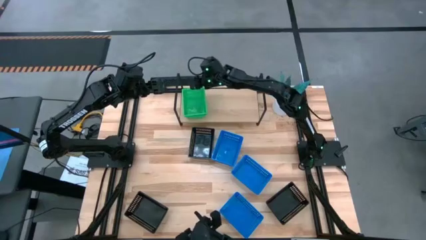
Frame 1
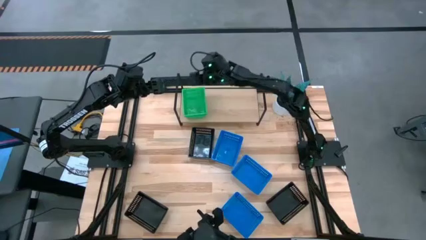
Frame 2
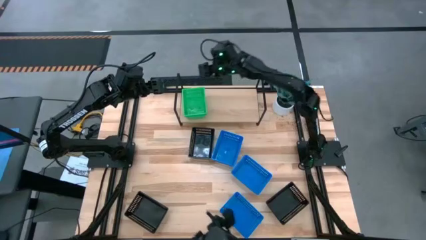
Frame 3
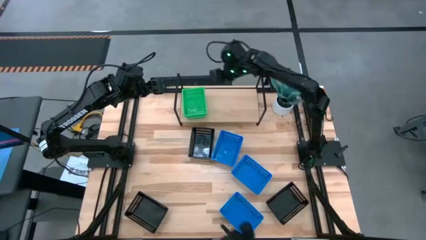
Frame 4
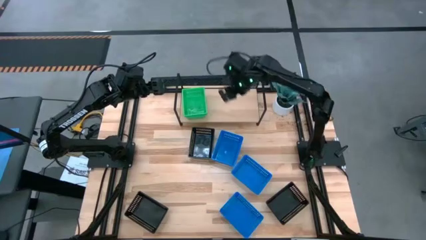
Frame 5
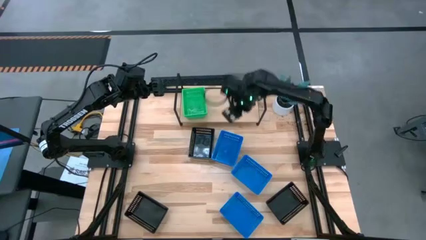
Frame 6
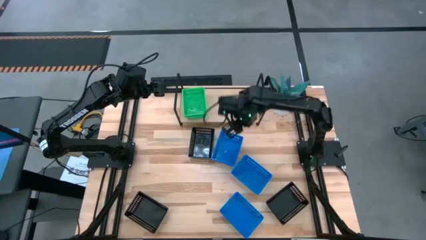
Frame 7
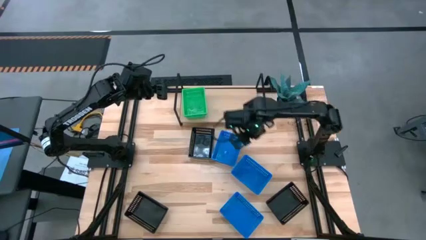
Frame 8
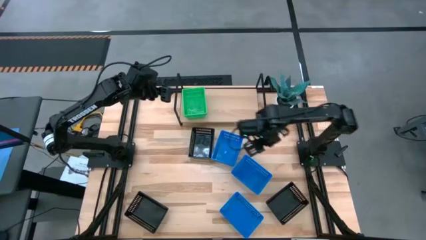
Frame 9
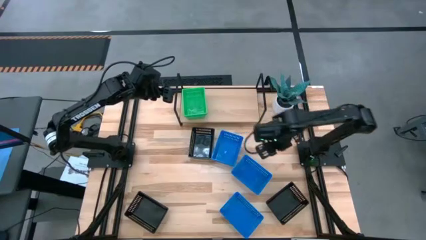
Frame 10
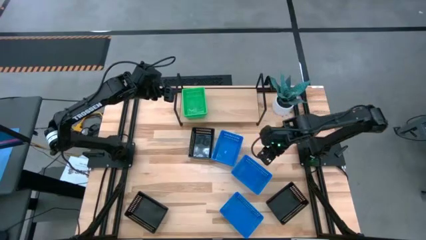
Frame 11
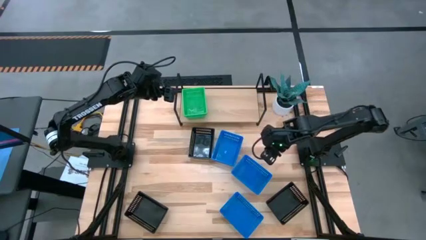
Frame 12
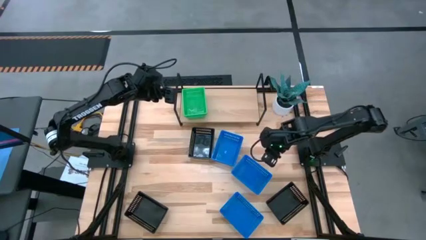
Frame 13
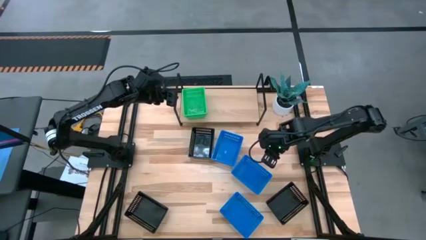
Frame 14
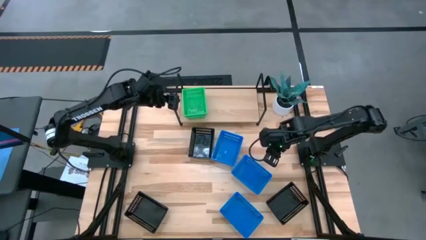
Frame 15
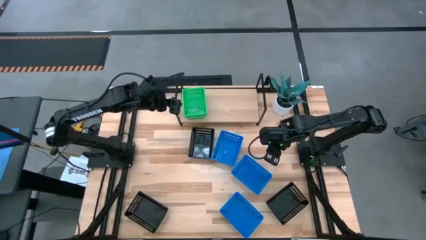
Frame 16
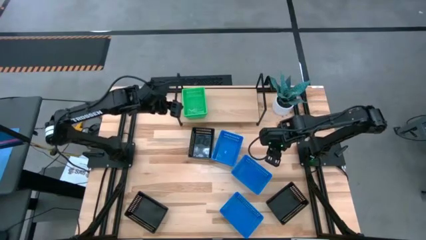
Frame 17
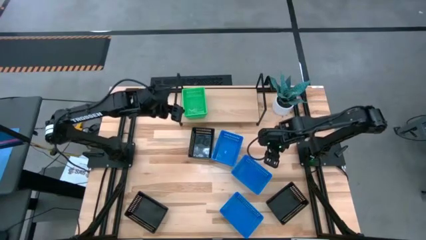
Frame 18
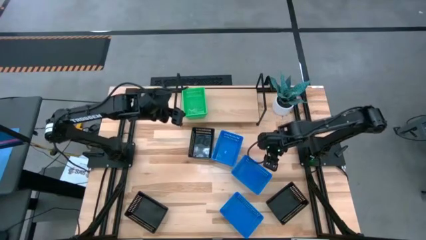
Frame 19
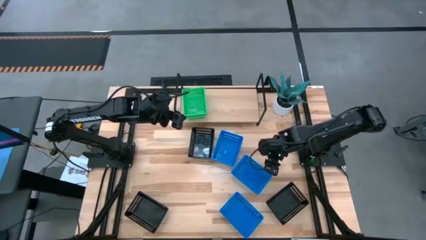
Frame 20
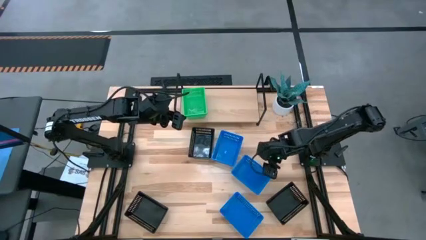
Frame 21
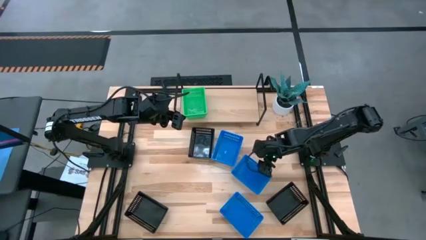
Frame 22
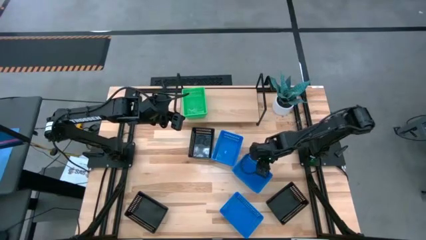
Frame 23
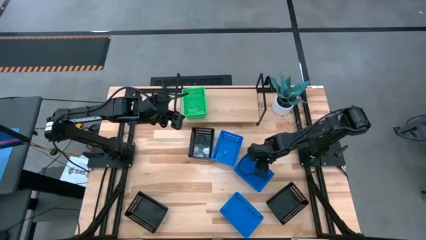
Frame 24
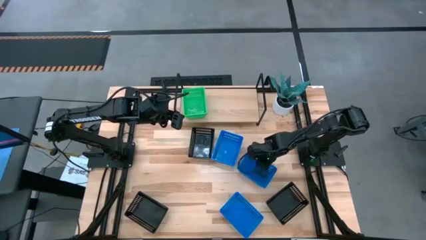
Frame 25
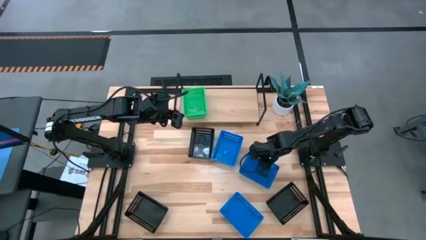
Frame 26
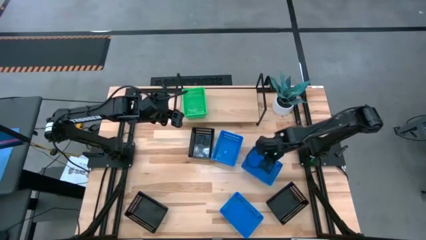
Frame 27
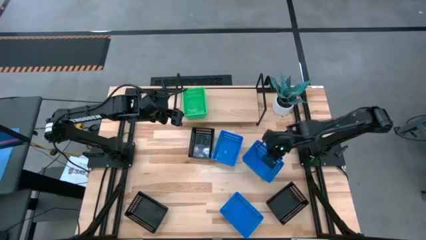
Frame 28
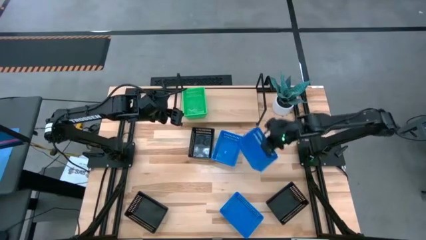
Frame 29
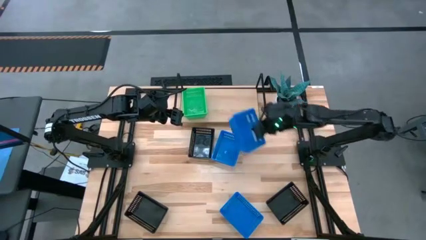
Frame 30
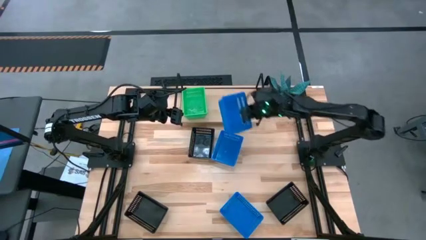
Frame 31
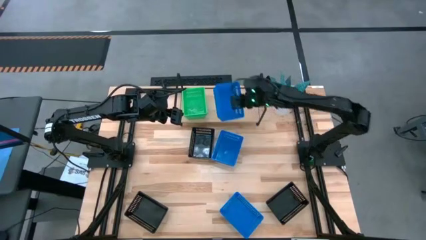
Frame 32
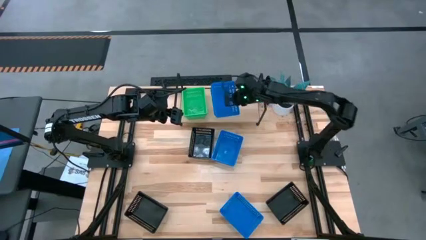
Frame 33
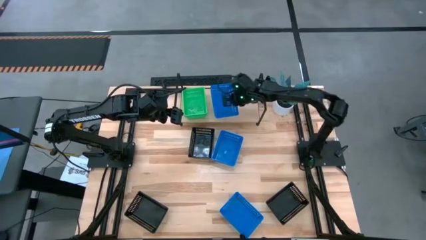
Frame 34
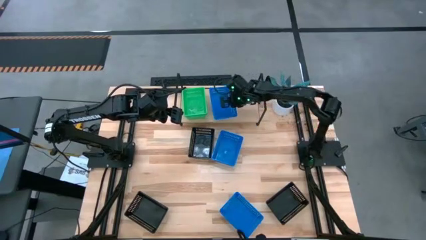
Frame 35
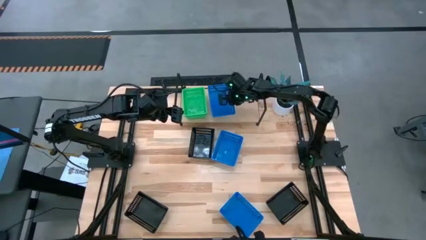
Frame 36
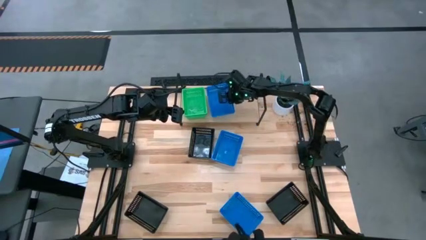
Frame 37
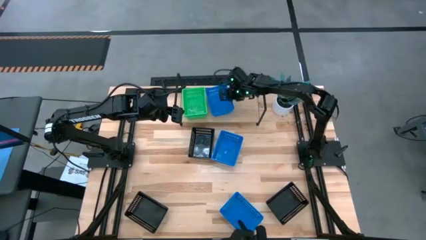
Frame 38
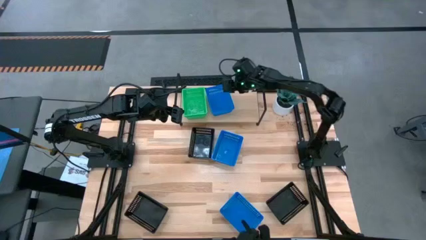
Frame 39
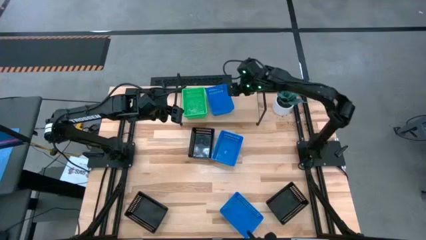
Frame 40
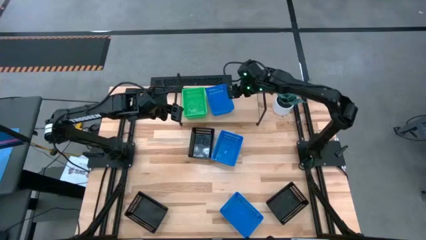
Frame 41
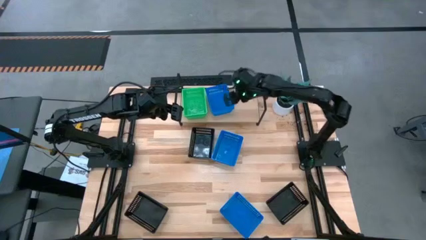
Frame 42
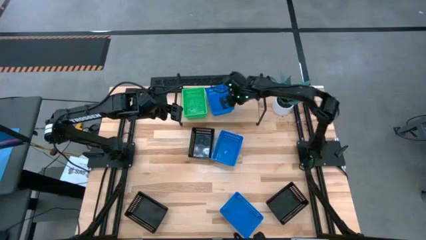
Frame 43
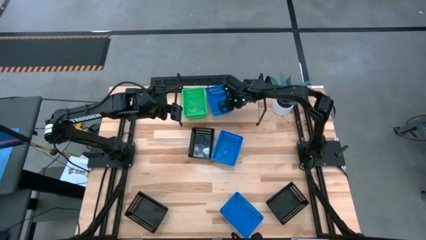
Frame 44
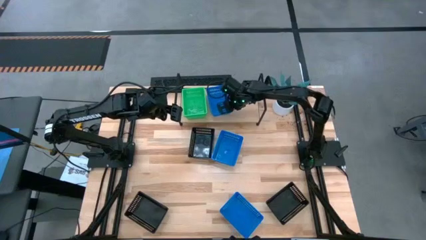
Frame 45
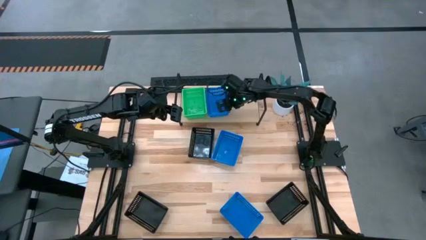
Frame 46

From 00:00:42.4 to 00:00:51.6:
Task: Stack baskets on shelf by color
Put the middle blue bin on the shelf

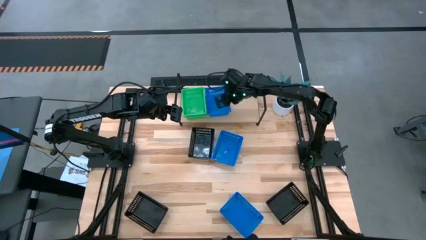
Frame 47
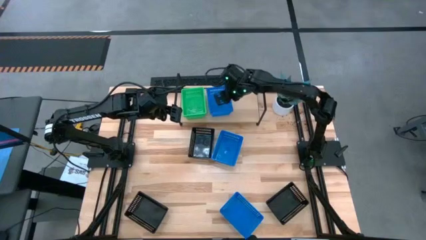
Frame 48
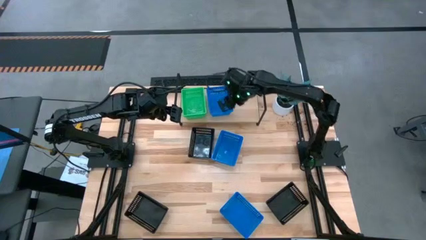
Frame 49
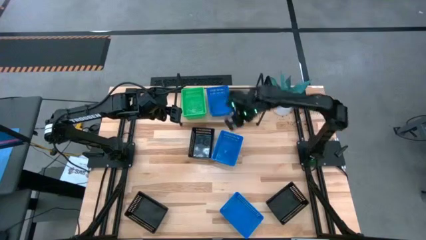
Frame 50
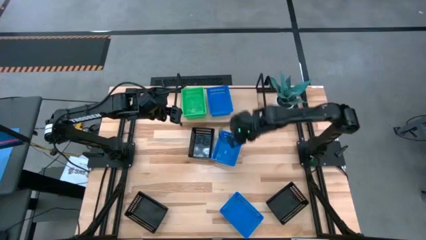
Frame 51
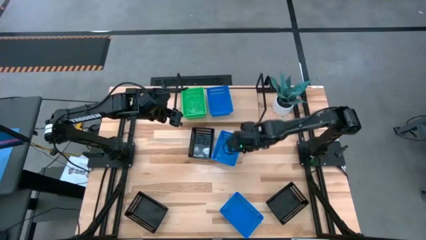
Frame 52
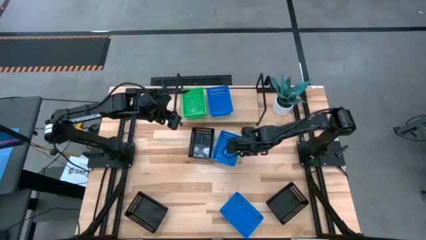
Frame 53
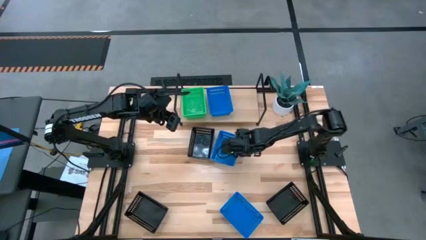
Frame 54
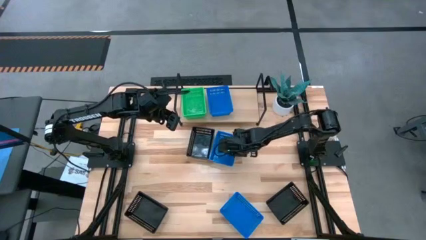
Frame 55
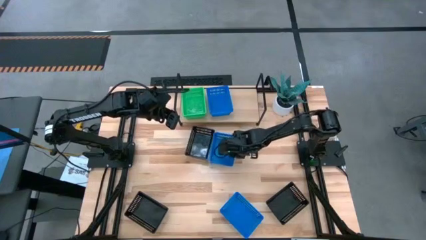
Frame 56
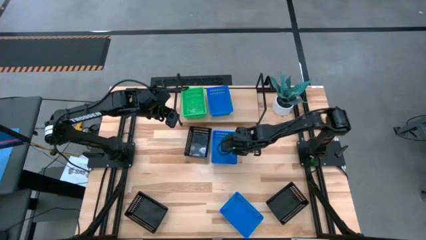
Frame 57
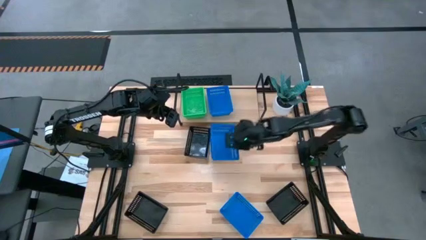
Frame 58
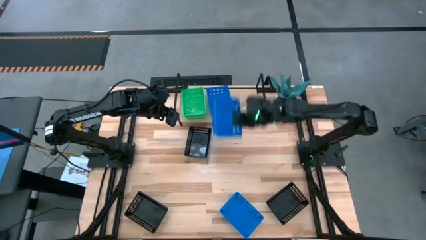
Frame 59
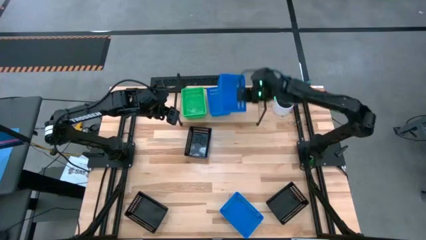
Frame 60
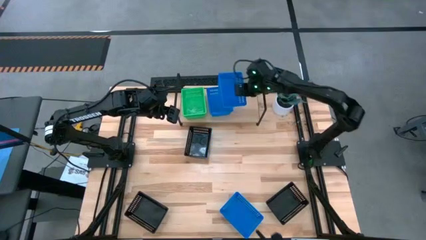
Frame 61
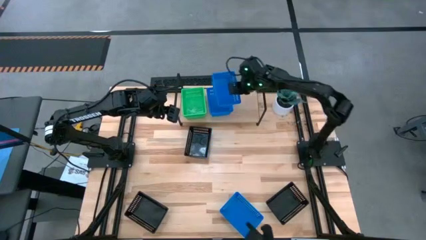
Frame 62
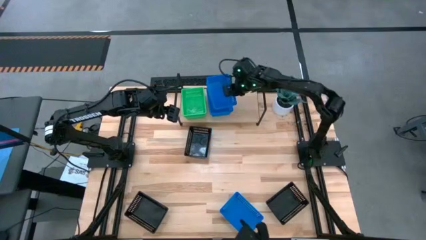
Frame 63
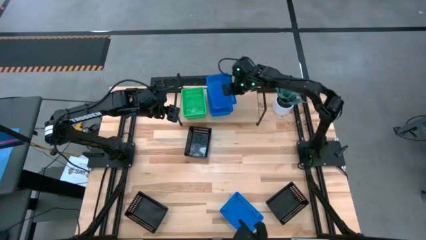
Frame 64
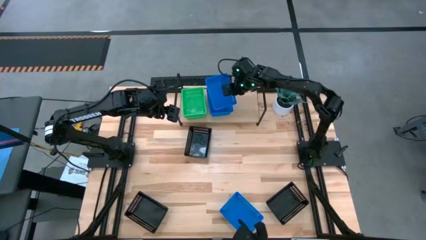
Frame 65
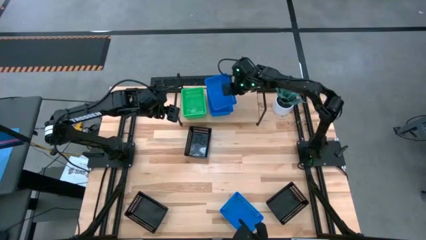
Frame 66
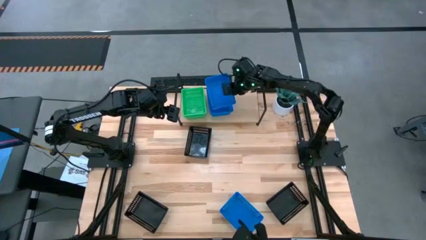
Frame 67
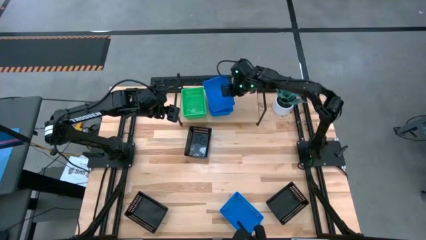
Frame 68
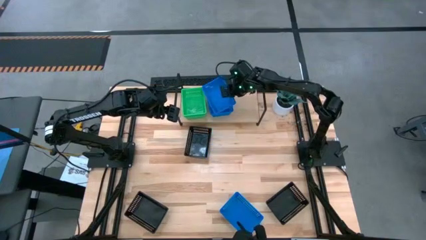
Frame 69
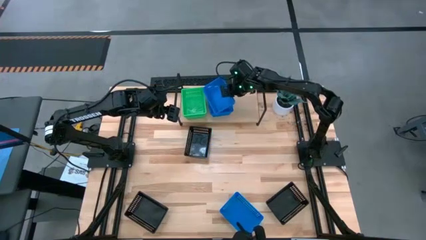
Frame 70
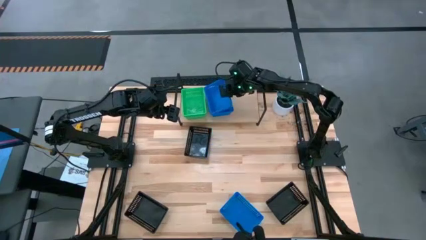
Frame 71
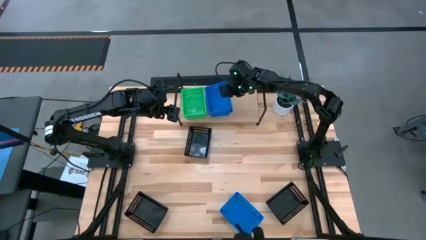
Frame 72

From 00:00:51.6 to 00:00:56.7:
Stack the top blue bin on the other blue bin on the shelf
